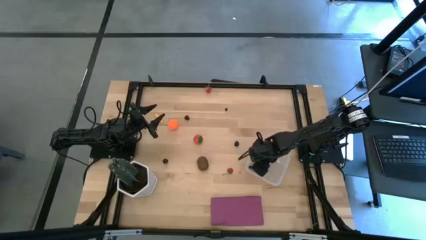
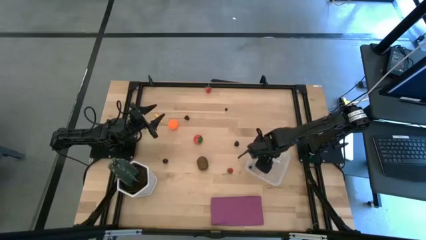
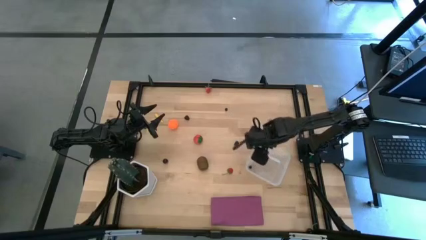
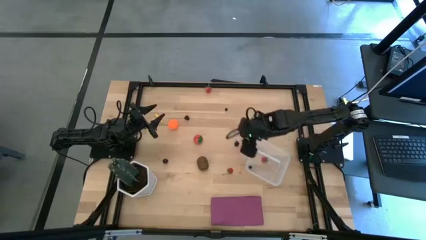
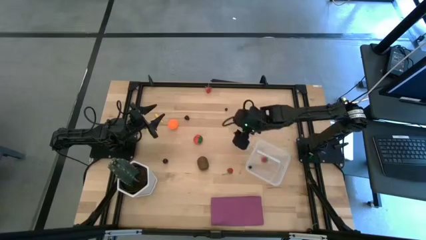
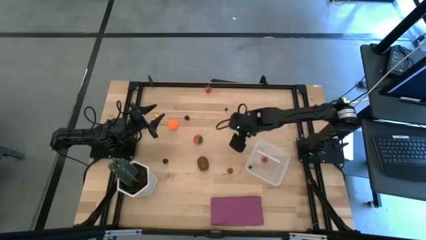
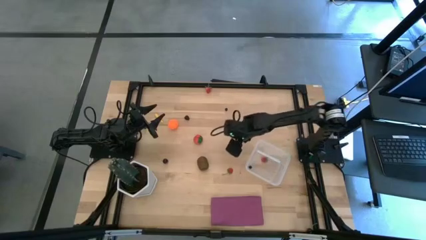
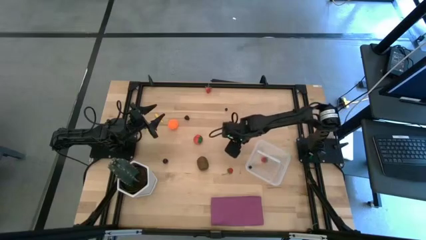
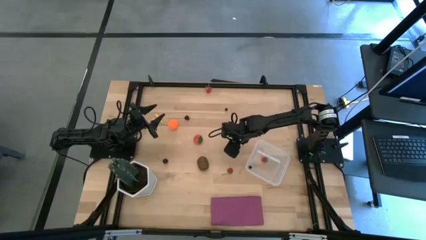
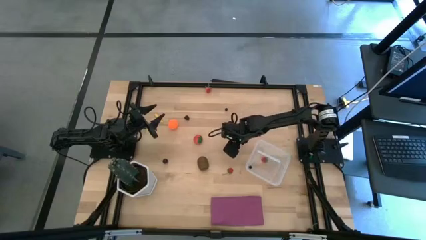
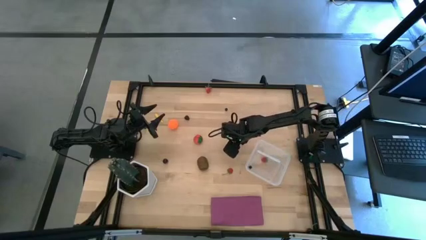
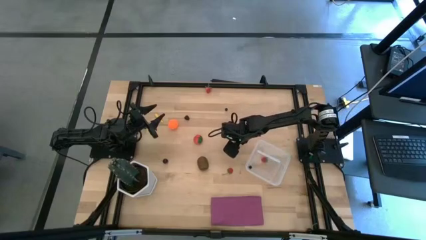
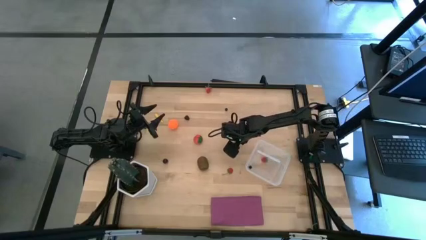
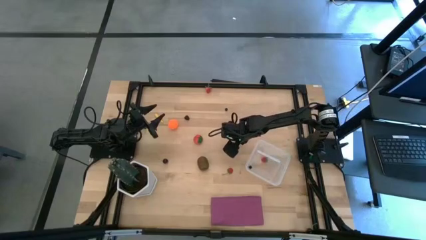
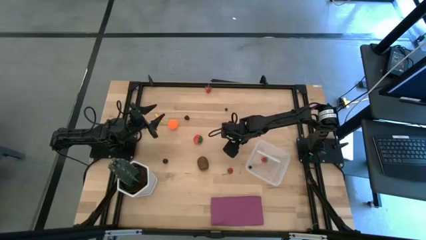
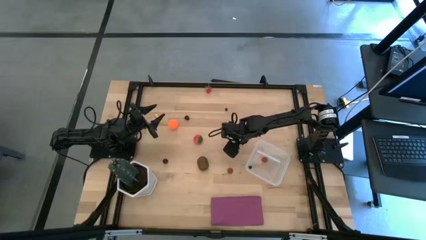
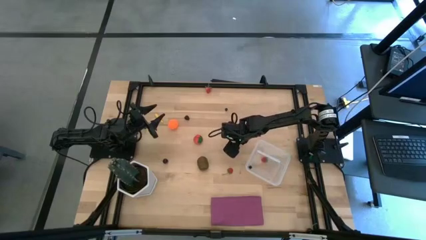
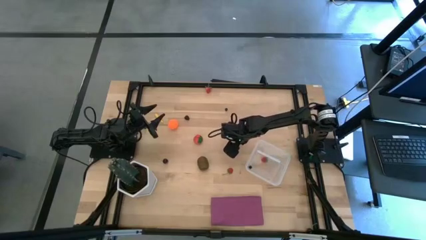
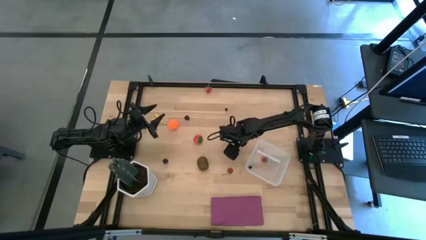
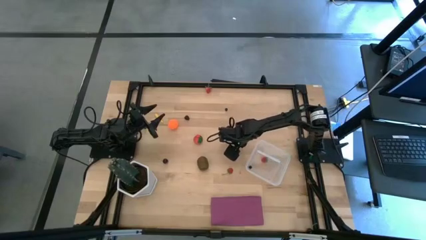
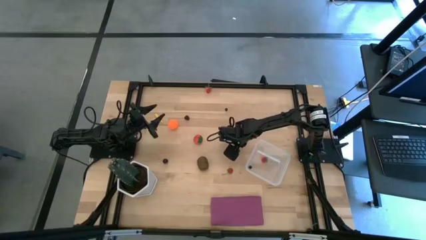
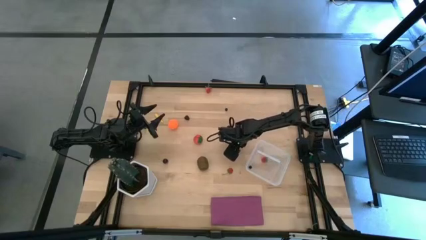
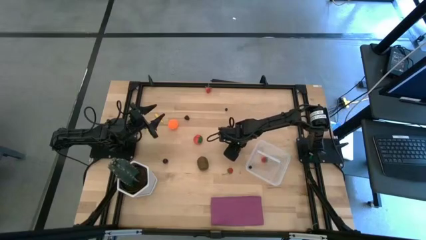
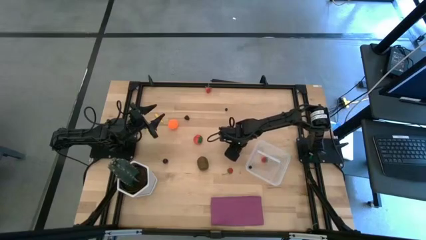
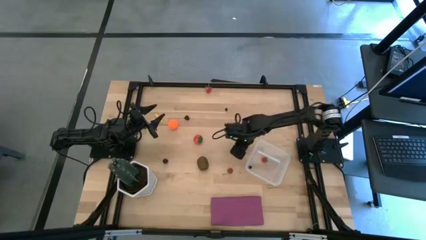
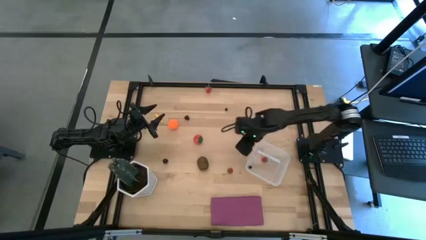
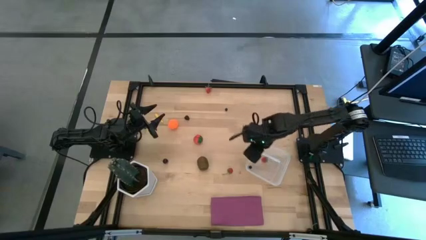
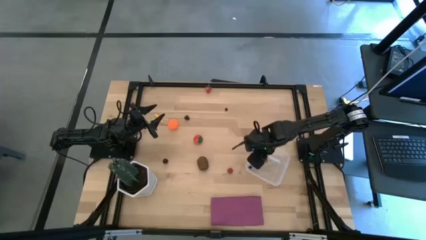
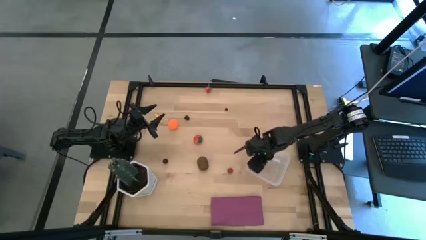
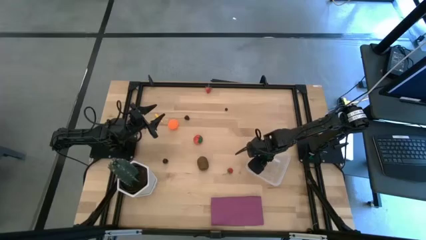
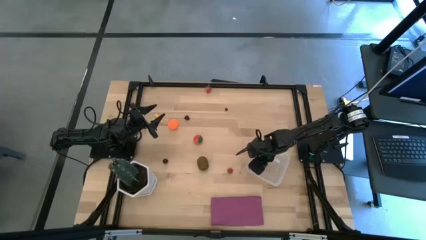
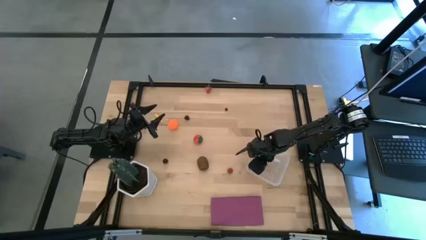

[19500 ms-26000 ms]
Task: Pick and placing Produce into tupperware
Put the blackberry into the transparent bin

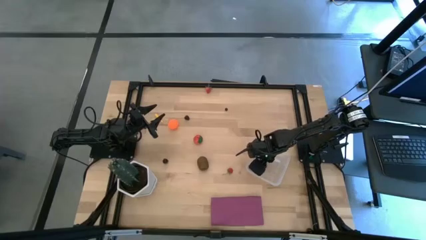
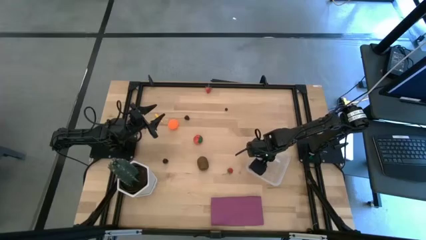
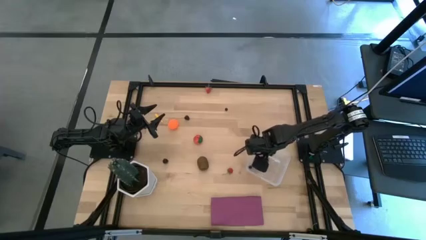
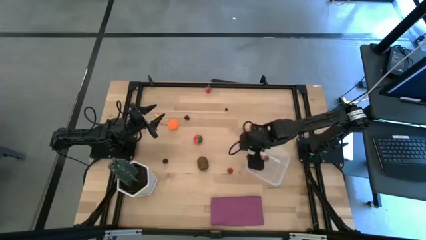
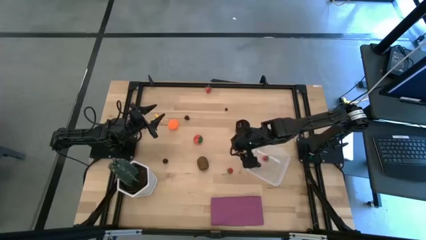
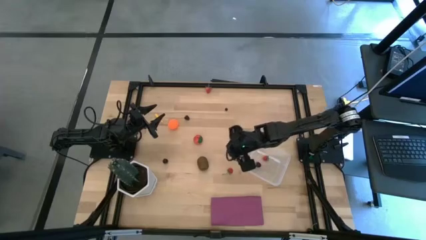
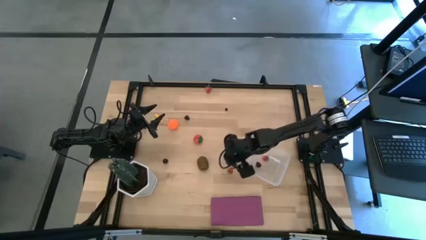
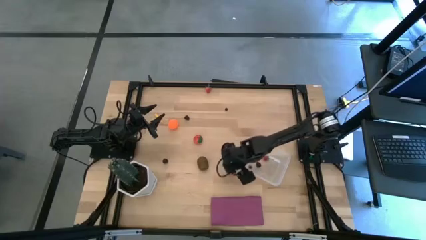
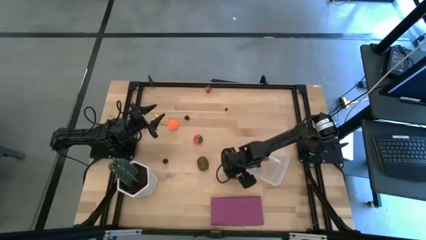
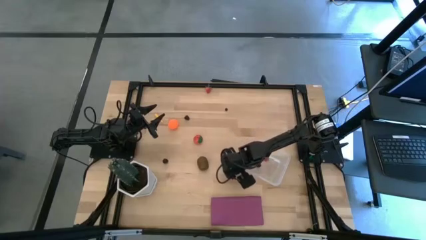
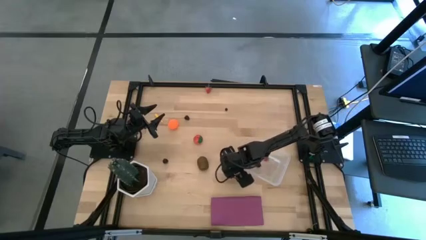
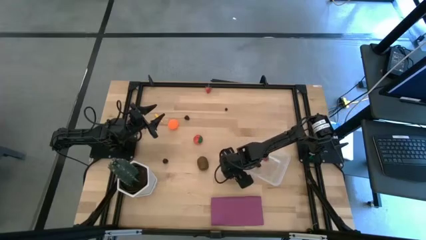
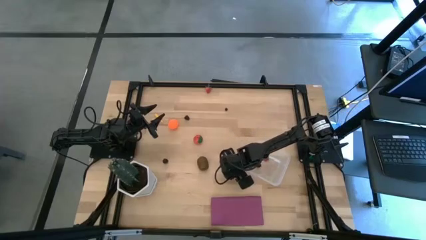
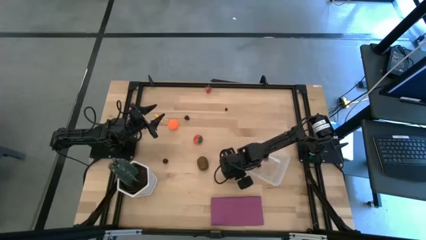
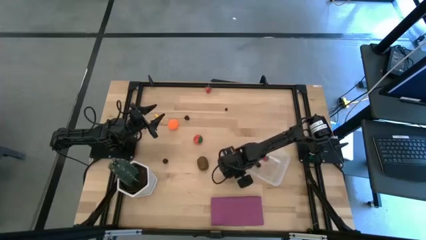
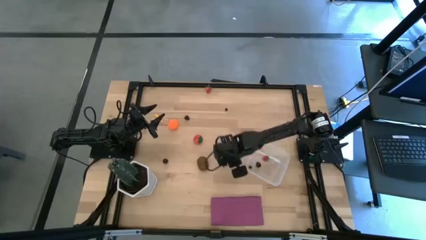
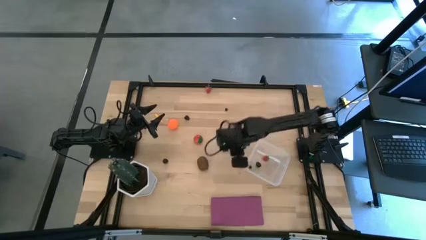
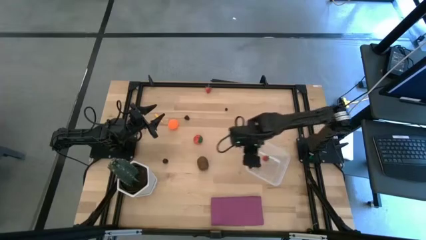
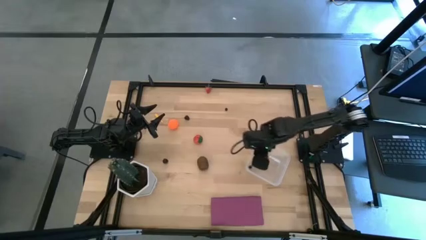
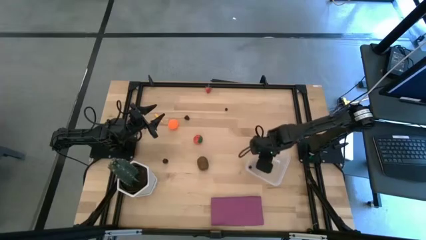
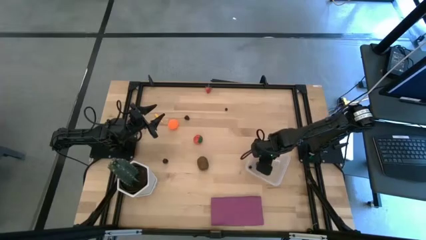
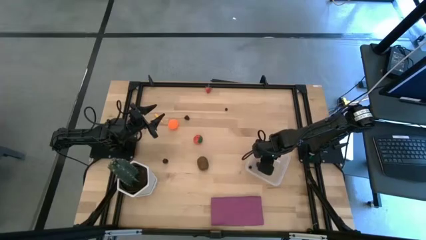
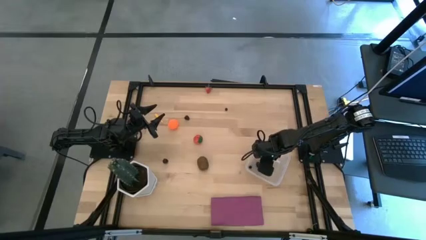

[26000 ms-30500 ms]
Put the strawberry into the transparent bin

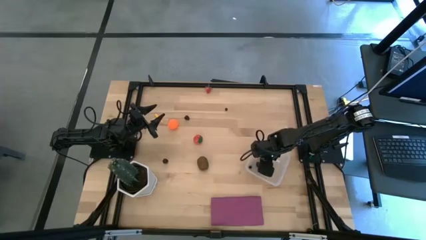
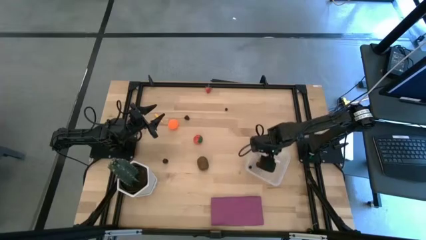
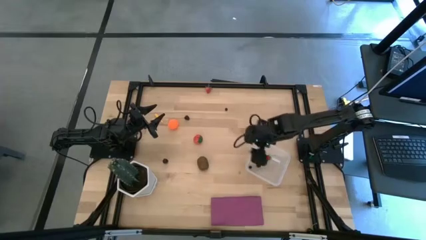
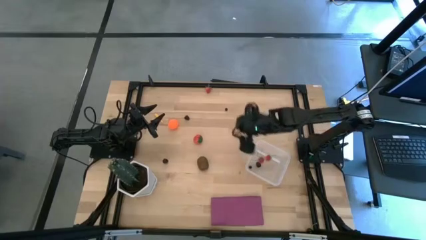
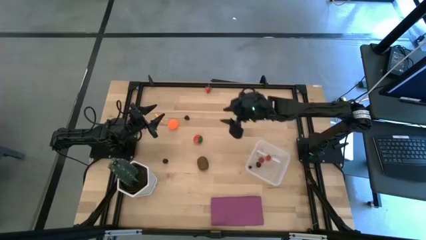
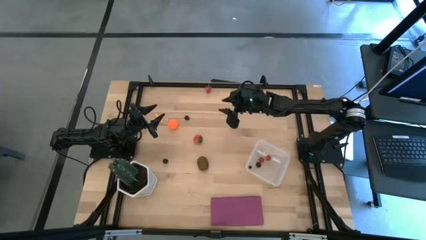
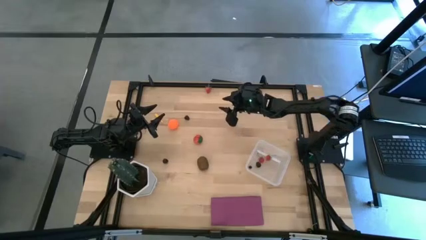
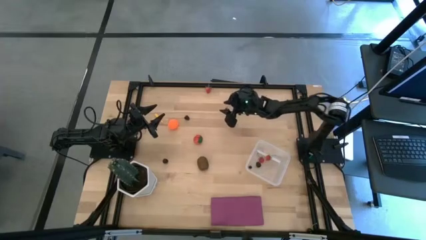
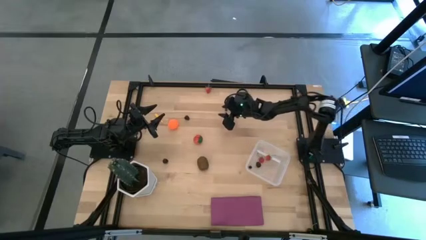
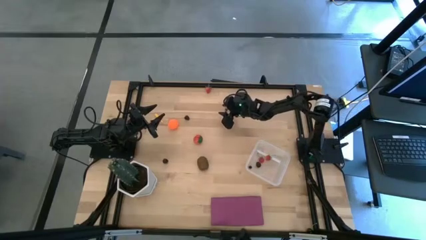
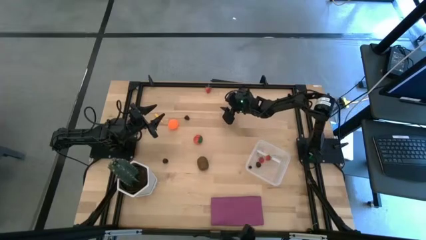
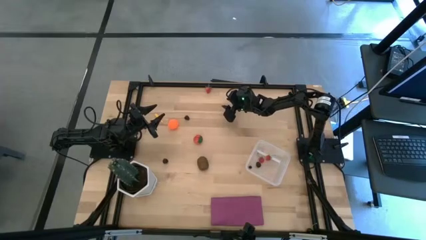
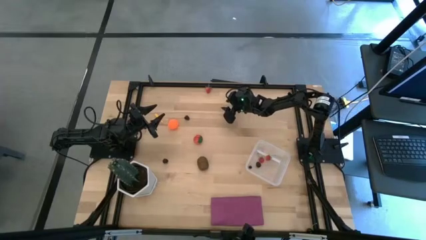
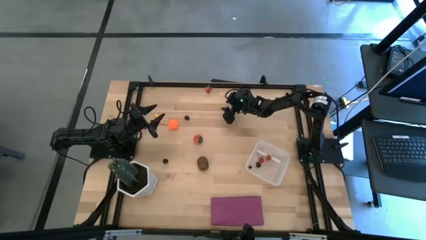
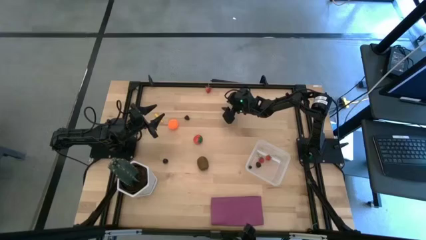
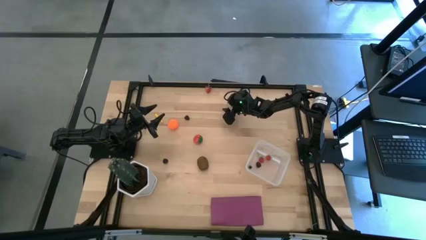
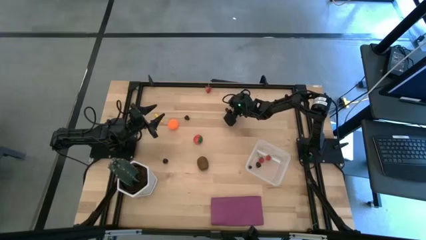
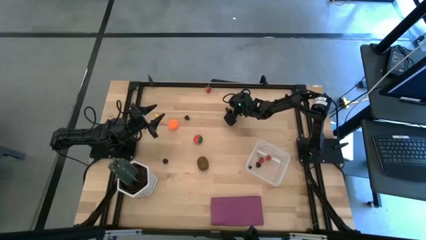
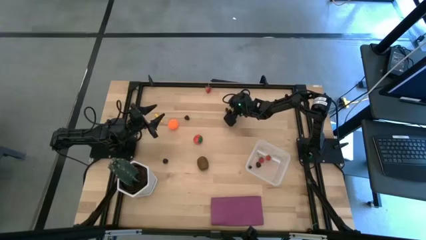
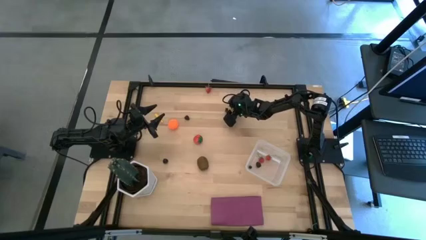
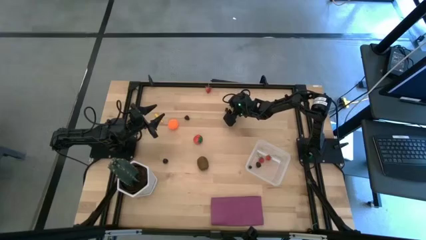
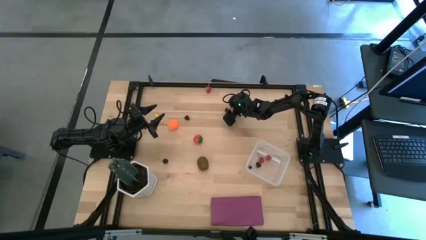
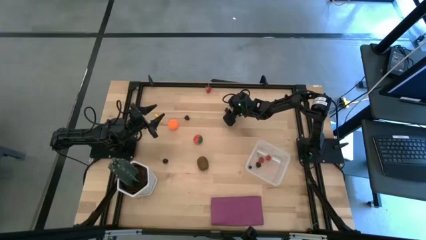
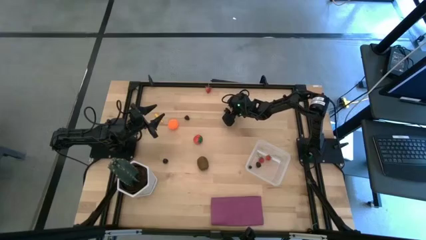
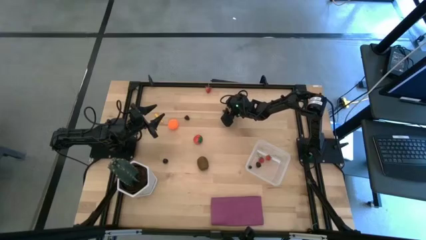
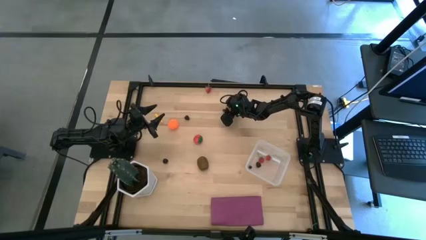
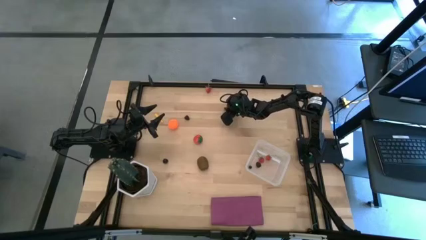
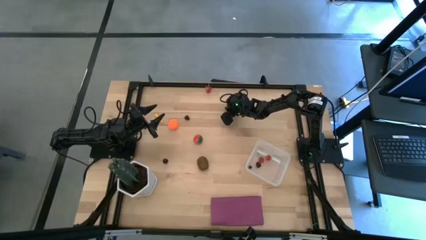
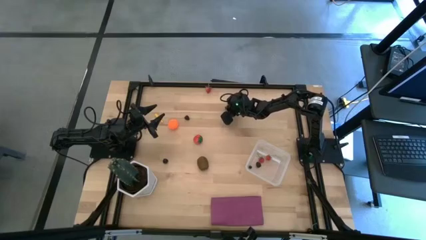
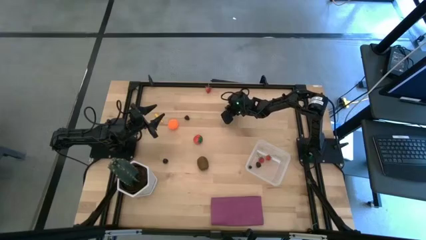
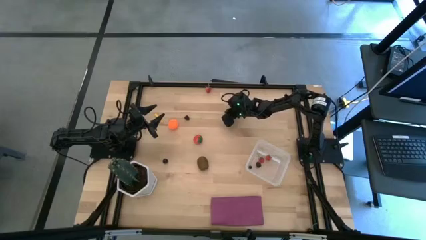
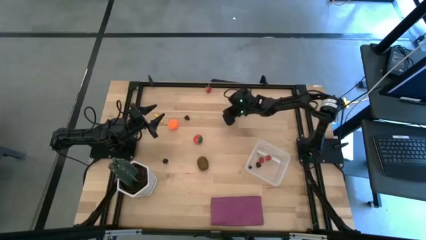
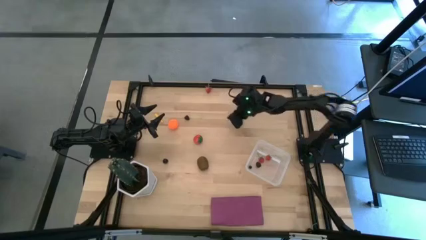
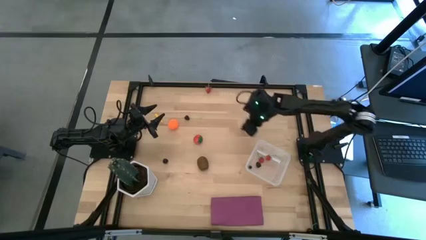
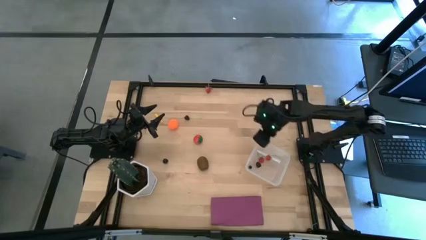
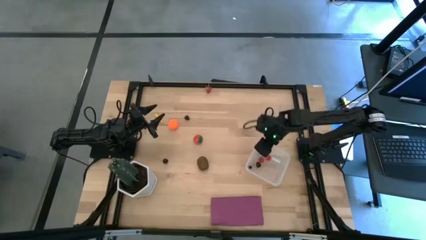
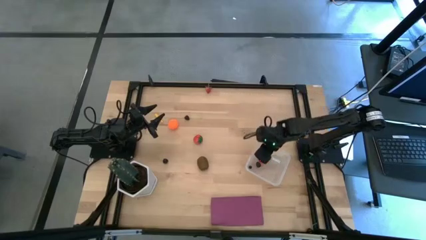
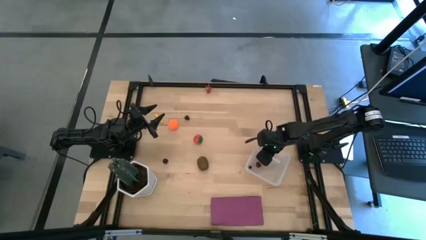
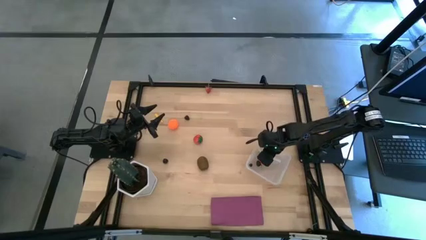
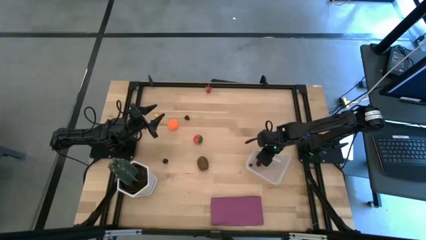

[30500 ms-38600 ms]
Put the blueberry into the transparent bin
